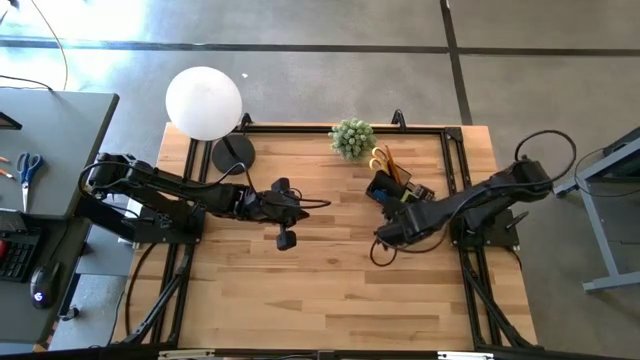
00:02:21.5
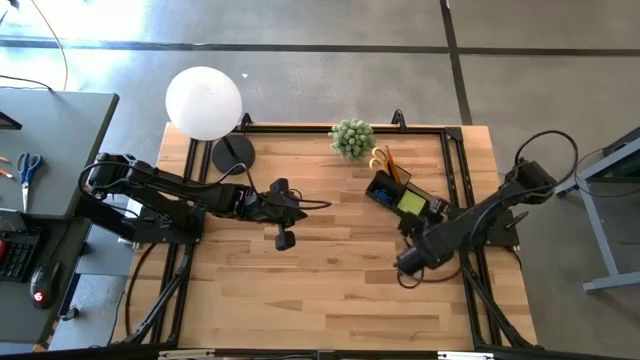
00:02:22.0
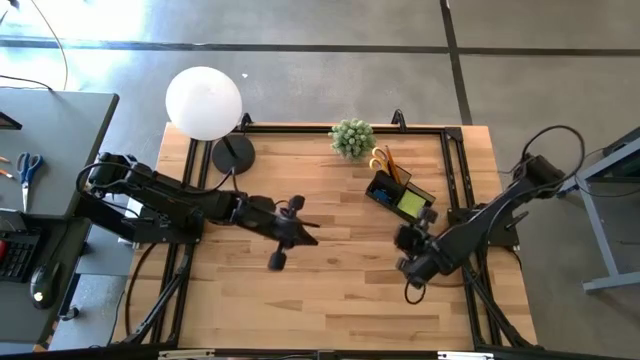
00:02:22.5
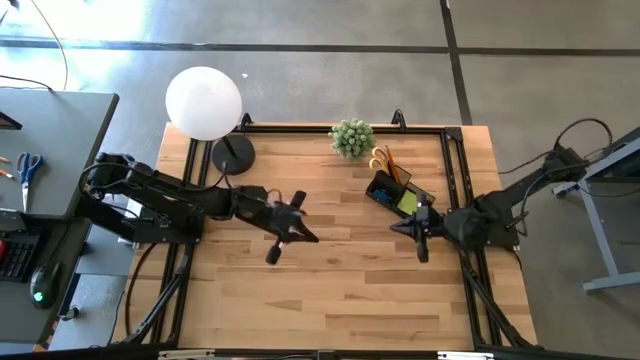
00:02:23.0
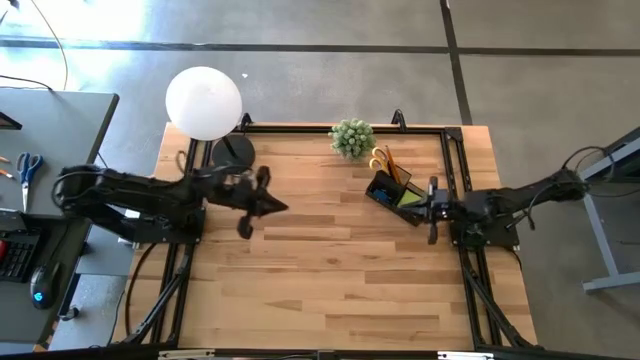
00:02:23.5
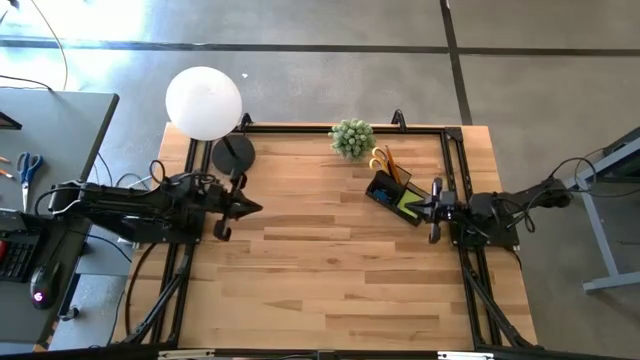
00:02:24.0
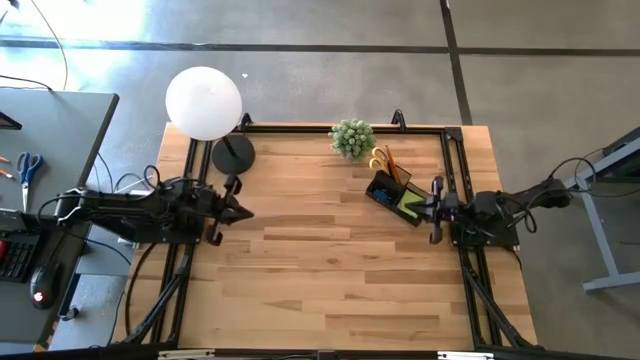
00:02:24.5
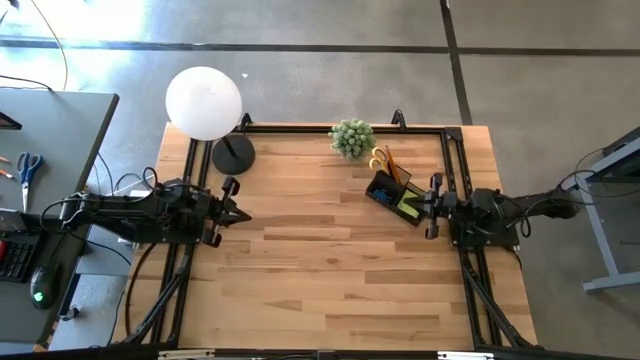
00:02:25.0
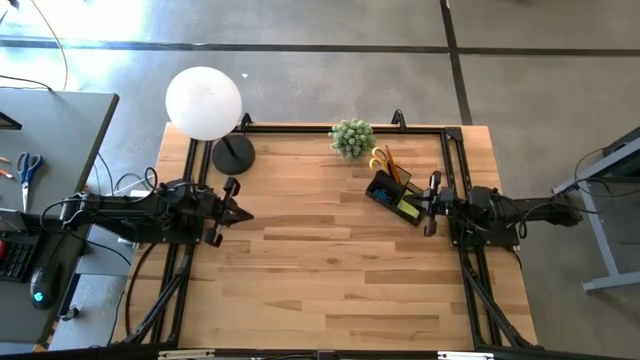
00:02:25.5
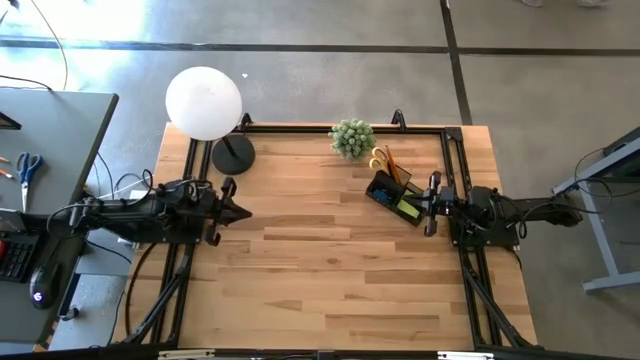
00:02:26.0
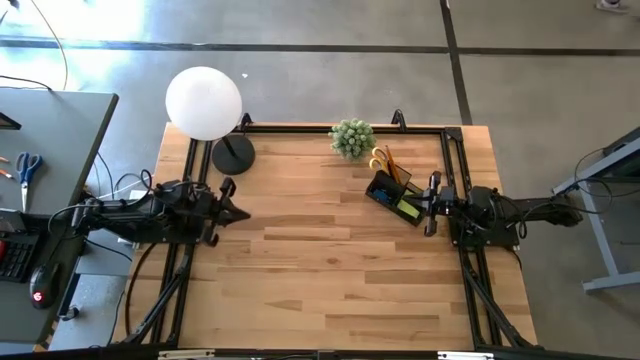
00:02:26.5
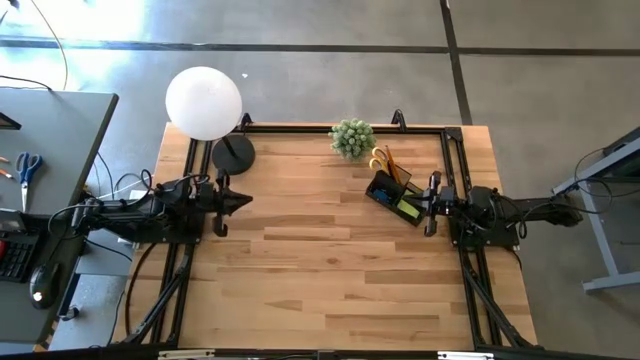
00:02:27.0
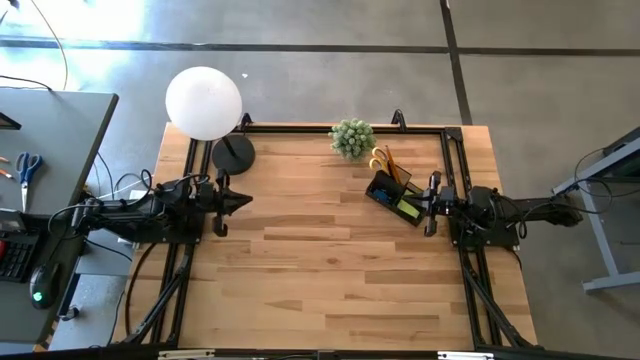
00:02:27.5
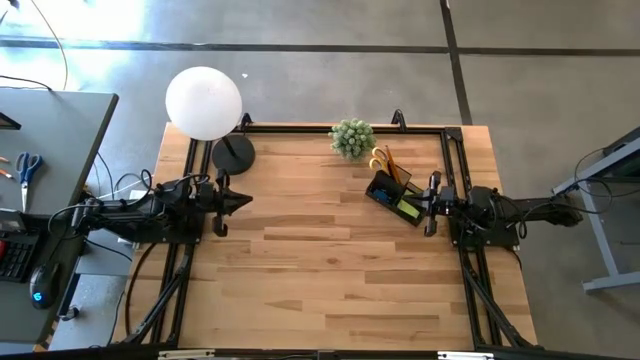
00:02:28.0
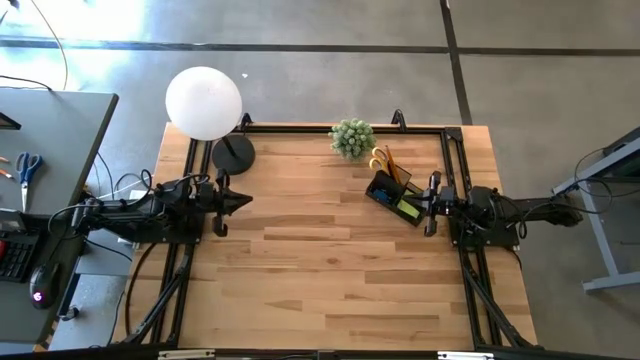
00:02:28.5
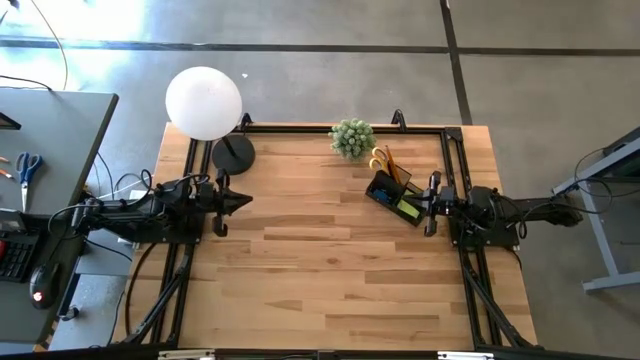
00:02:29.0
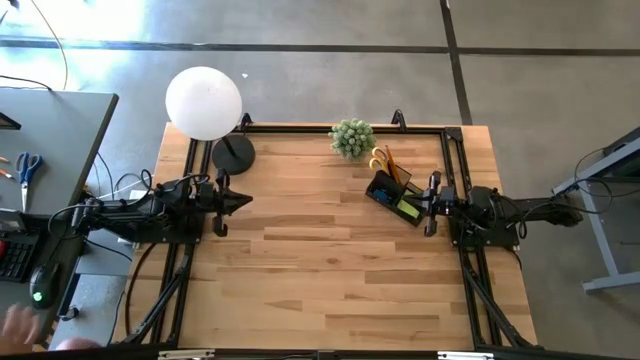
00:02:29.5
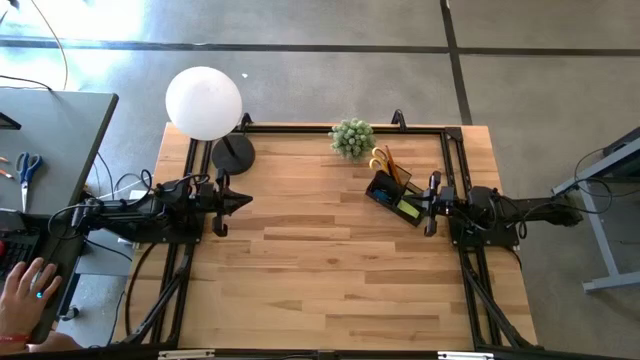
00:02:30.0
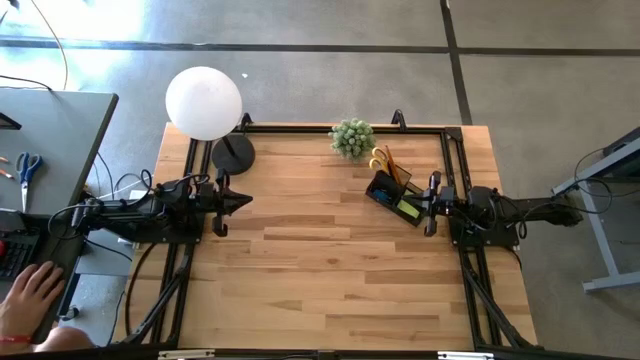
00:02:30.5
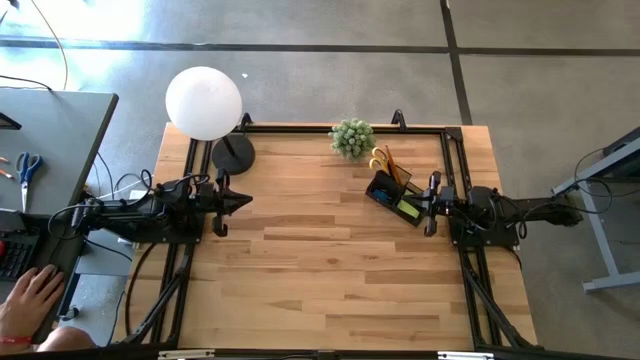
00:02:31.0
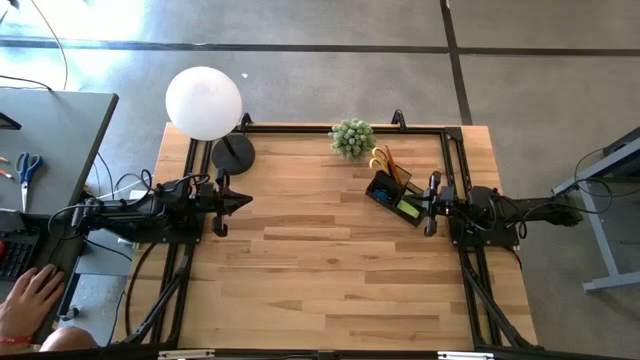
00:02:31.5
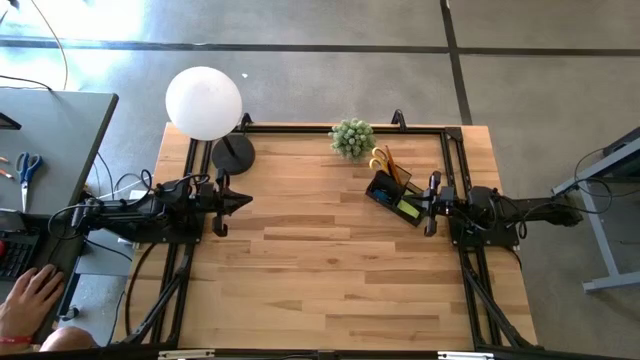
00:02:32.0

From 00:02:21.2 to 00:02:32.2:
Task: Pick and place office supplies into organizer
Return to Home Position

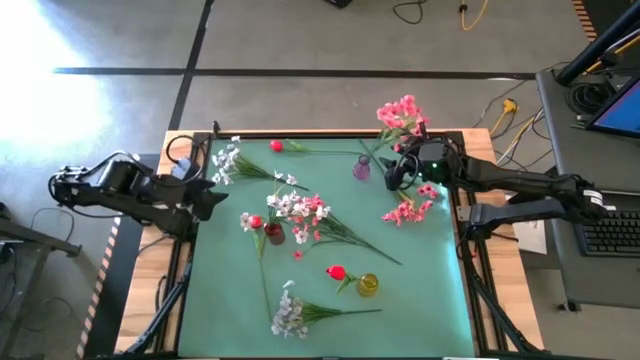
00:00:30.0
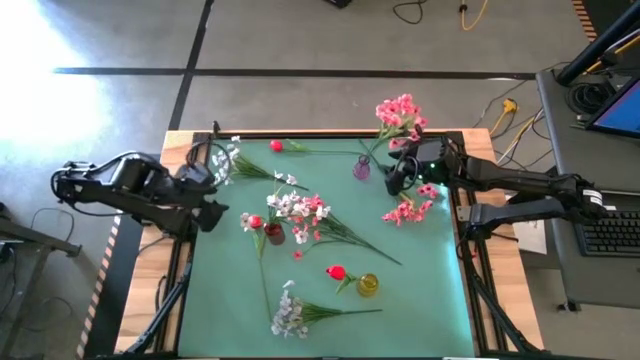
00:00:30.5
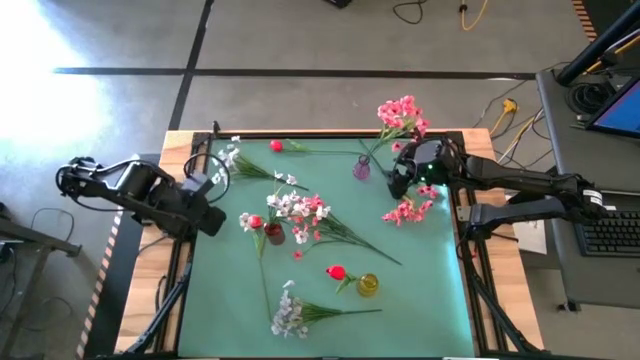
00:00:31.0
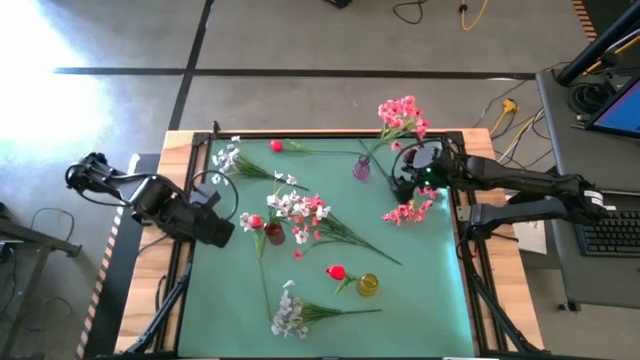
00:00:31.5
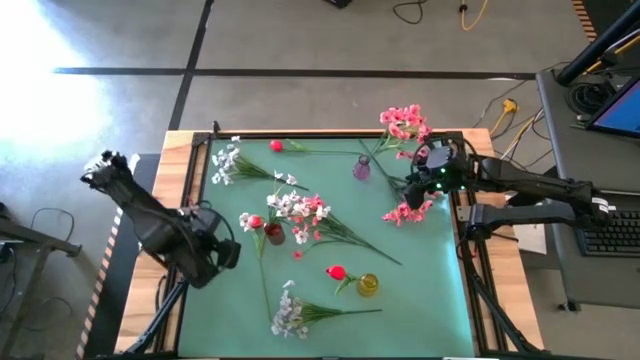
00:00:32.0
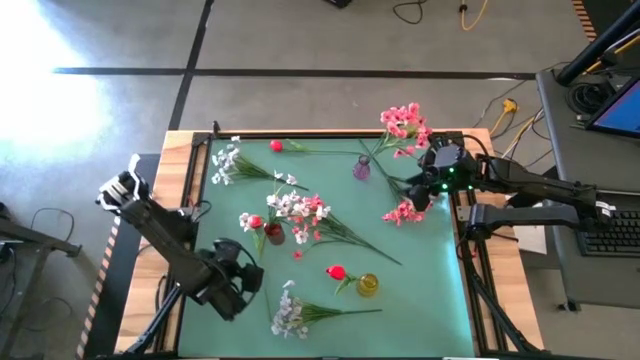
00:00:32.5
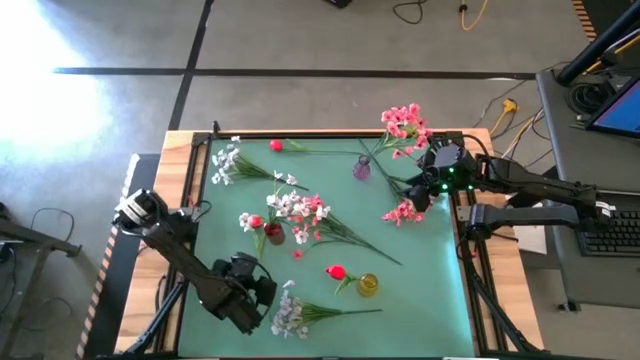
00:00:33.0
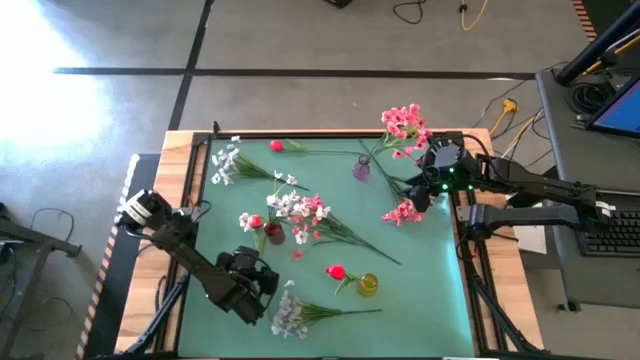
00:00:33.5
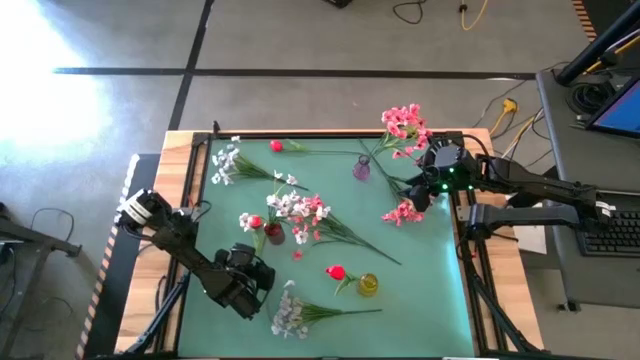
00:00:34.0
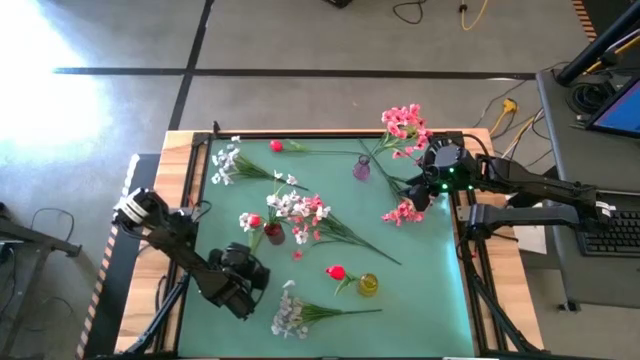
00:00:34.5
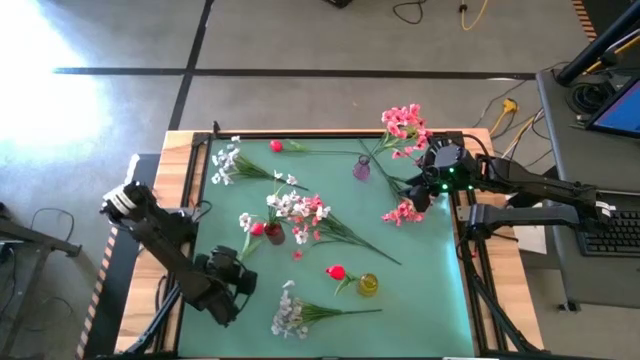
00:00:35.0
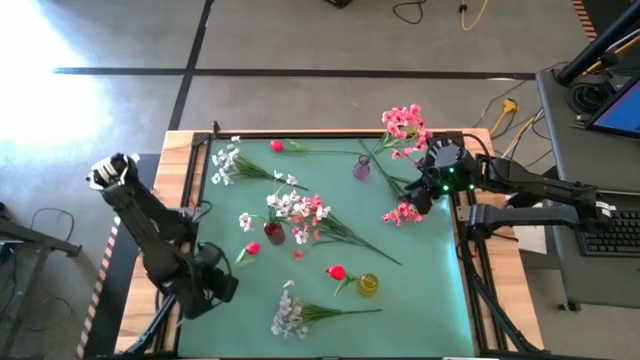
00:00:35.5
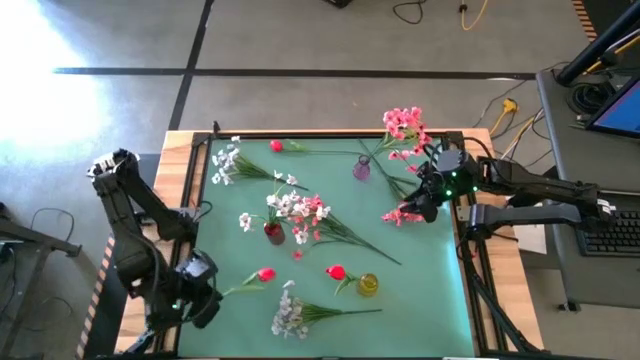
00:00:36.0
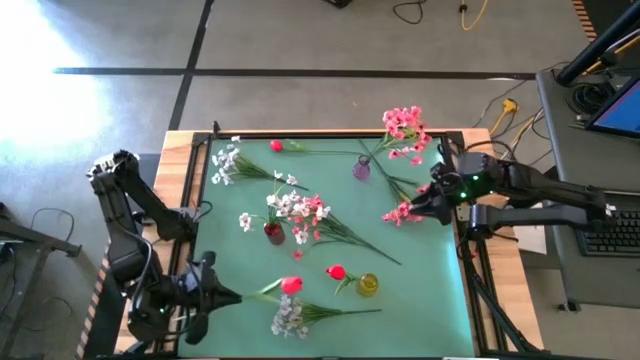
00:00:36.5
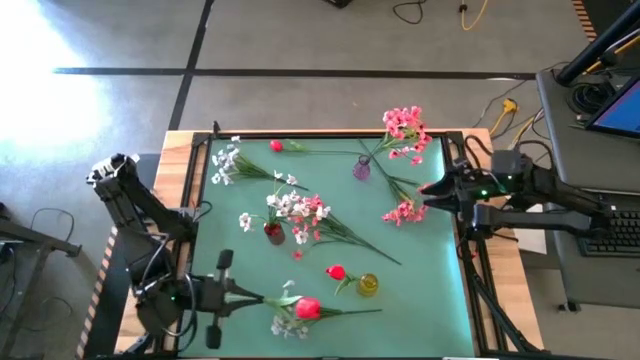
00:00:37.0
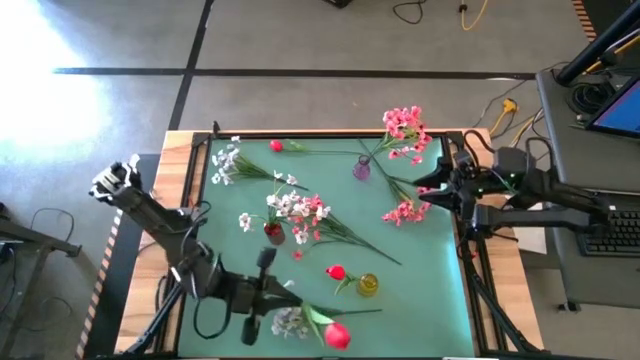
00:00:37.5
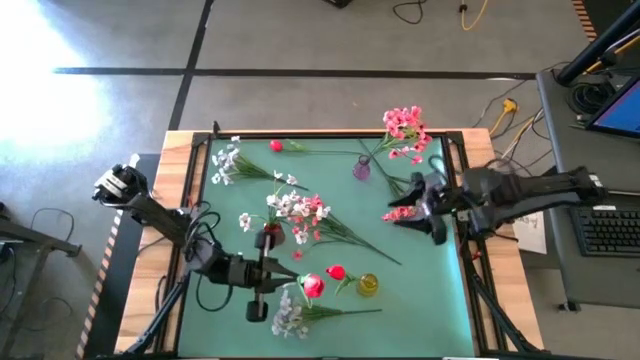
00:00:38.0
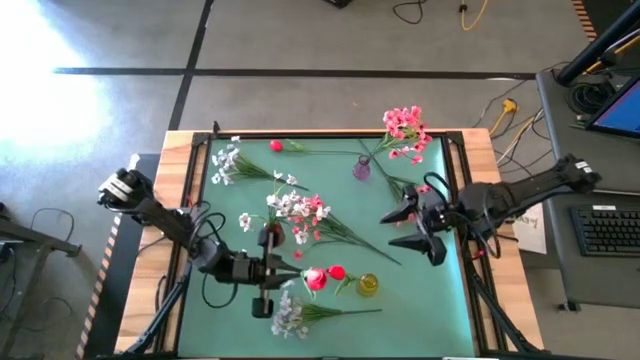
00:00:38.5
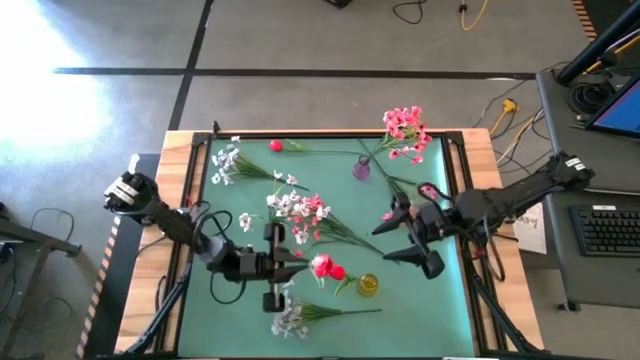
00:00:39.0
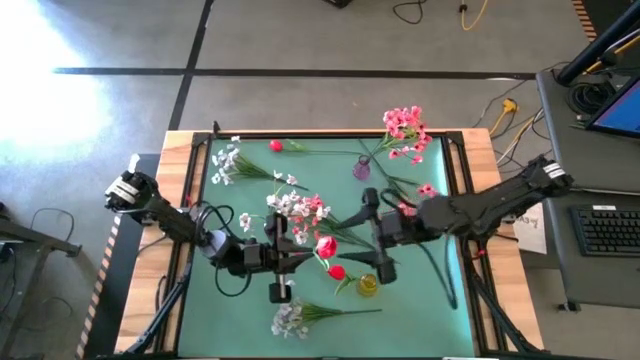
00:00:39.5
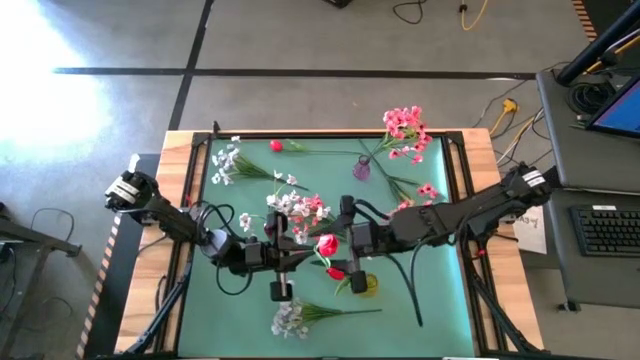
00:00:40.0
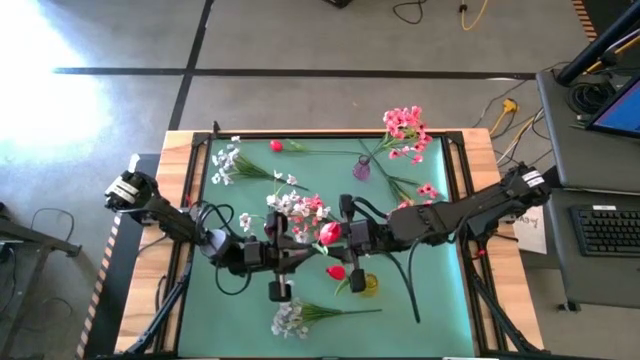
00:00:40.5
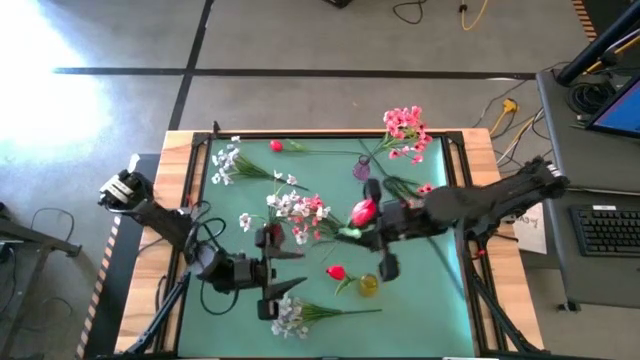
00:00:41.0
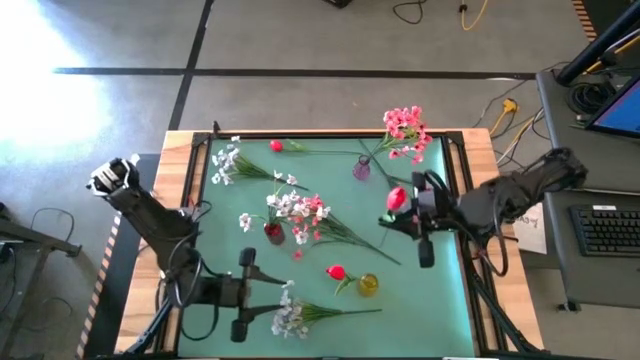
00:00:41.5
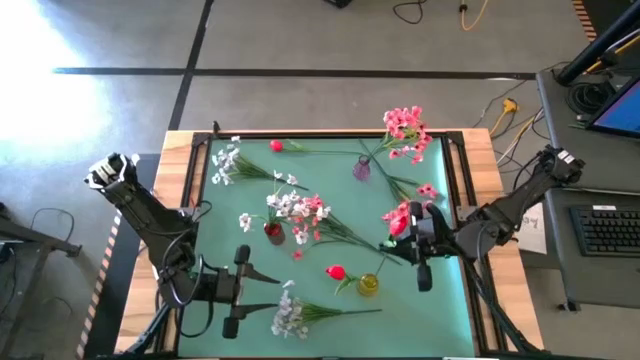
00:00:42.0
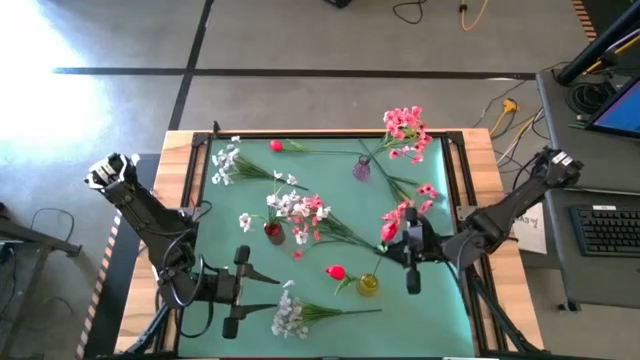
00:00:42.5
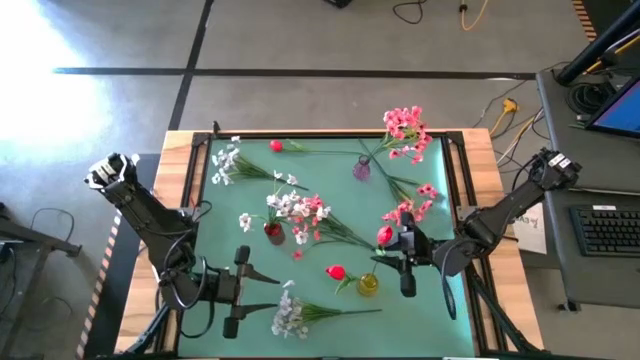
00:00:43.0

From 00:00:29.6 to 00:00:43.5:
Task: Sort flowers into vase by color
Put the bottom red tulip into the yellow flower vase
